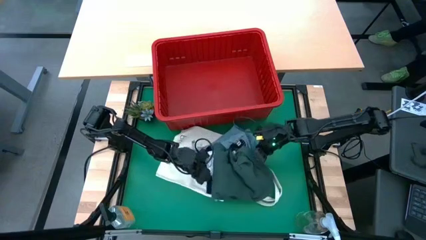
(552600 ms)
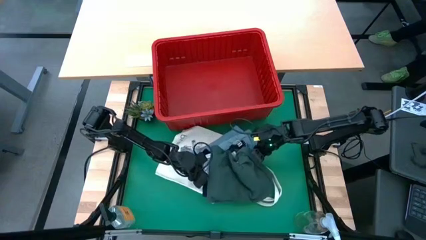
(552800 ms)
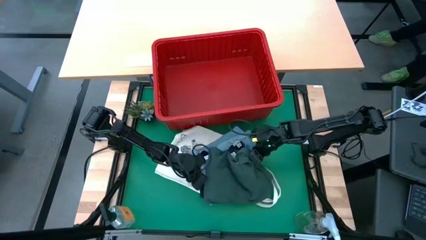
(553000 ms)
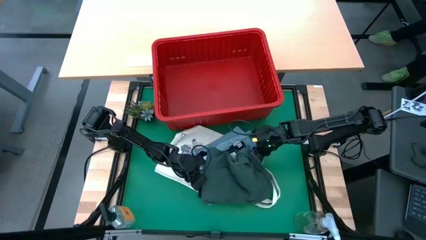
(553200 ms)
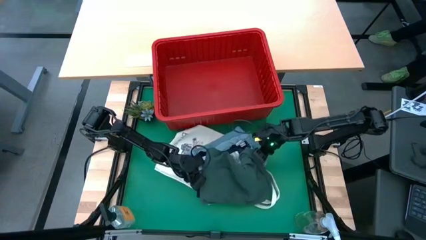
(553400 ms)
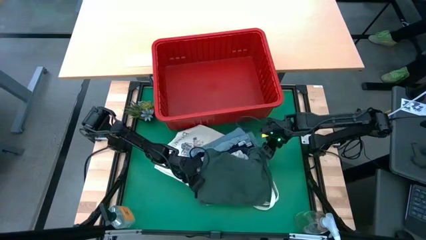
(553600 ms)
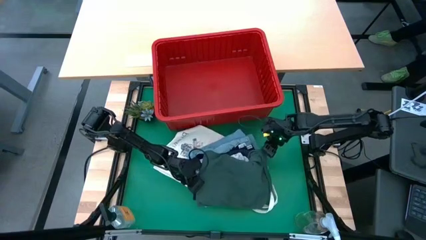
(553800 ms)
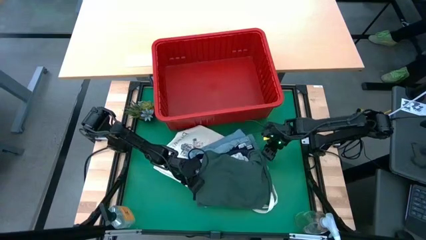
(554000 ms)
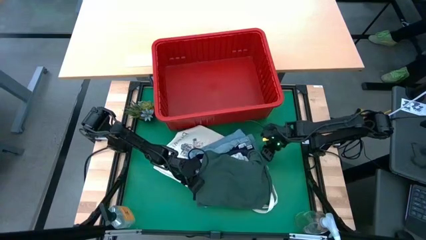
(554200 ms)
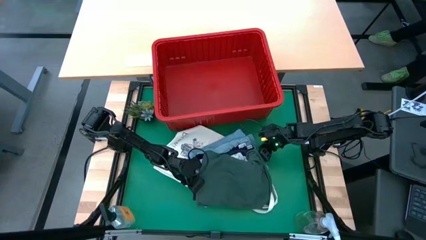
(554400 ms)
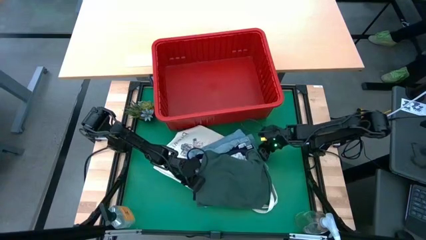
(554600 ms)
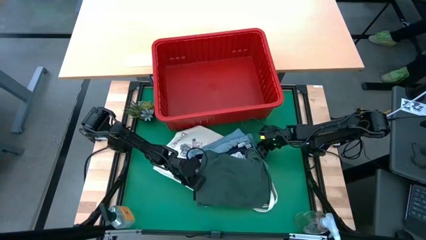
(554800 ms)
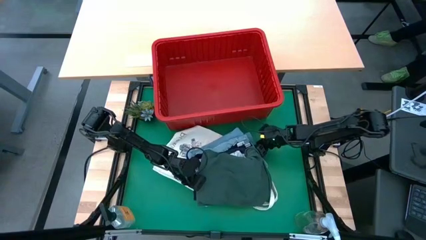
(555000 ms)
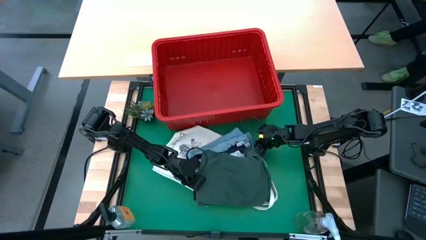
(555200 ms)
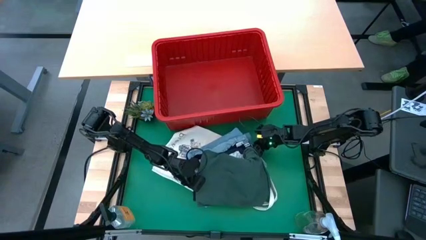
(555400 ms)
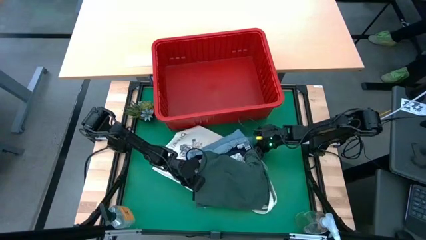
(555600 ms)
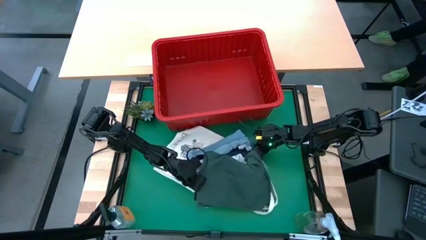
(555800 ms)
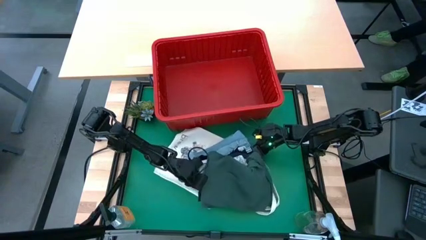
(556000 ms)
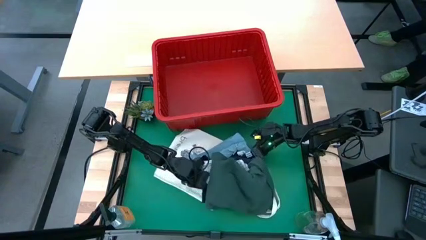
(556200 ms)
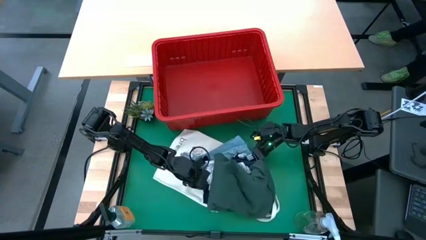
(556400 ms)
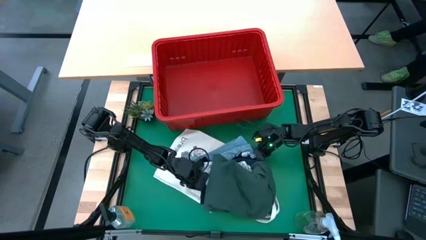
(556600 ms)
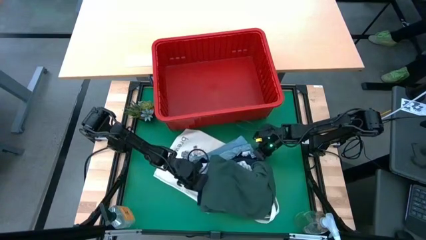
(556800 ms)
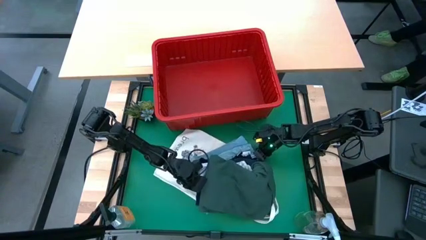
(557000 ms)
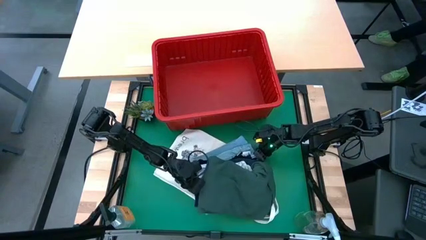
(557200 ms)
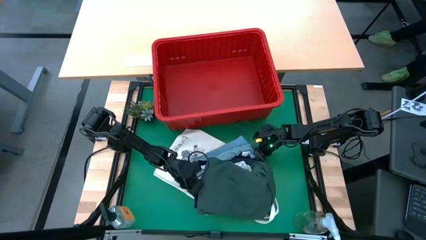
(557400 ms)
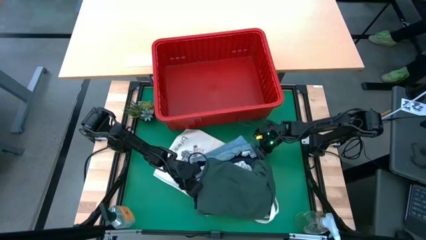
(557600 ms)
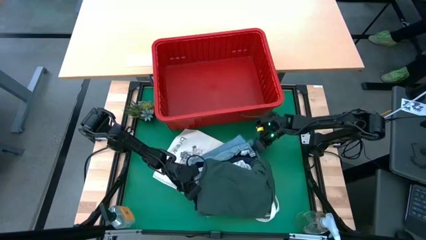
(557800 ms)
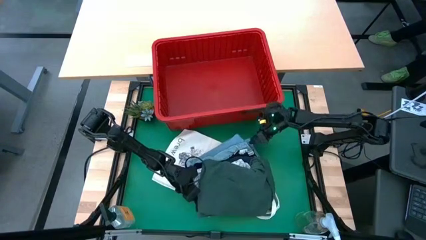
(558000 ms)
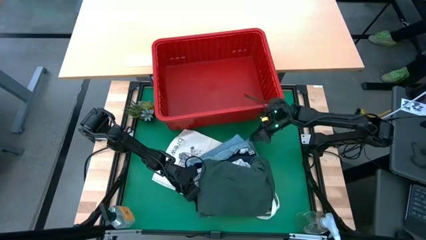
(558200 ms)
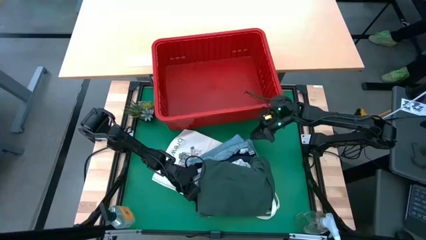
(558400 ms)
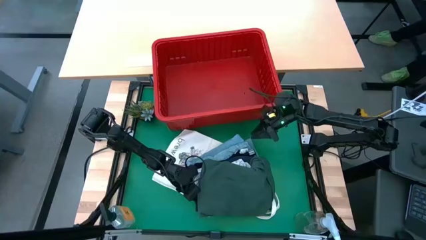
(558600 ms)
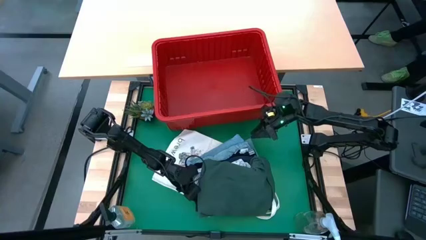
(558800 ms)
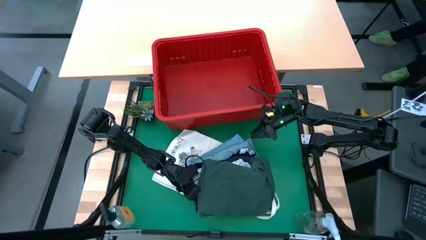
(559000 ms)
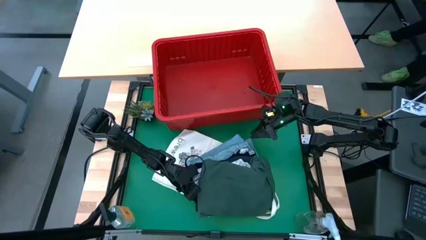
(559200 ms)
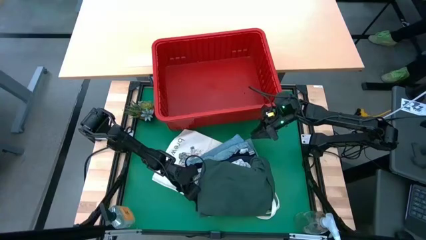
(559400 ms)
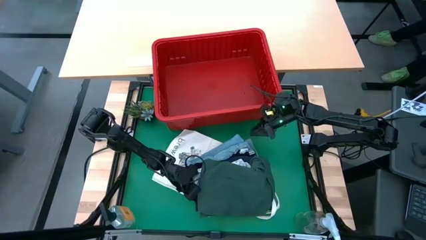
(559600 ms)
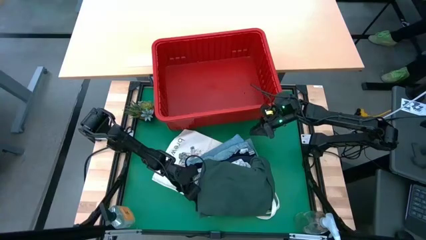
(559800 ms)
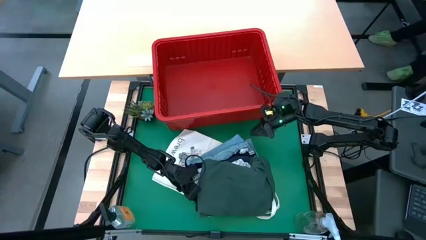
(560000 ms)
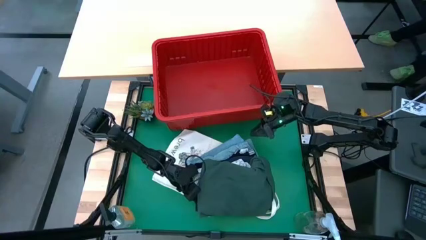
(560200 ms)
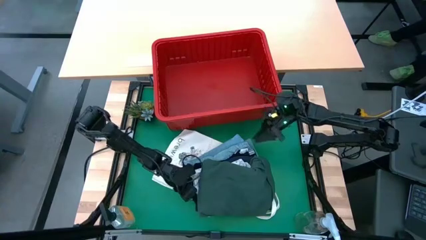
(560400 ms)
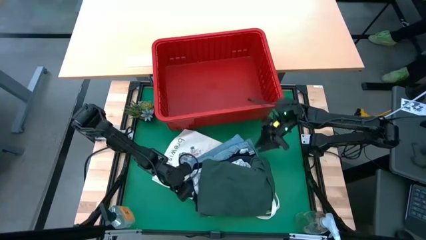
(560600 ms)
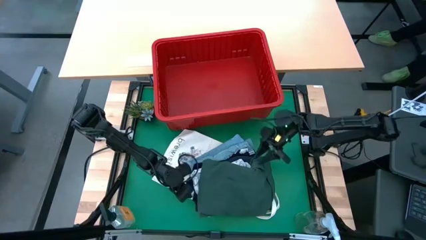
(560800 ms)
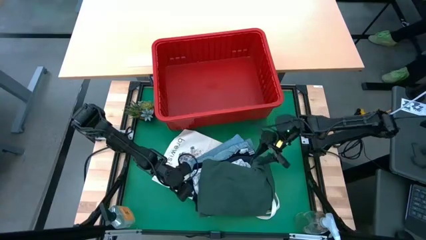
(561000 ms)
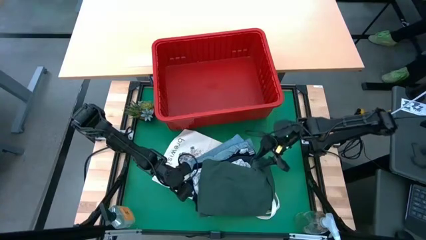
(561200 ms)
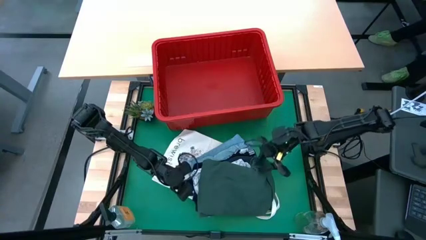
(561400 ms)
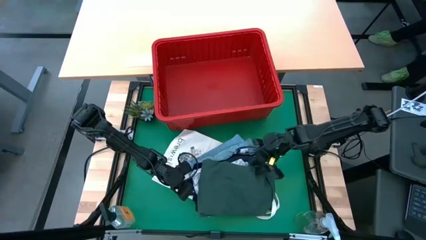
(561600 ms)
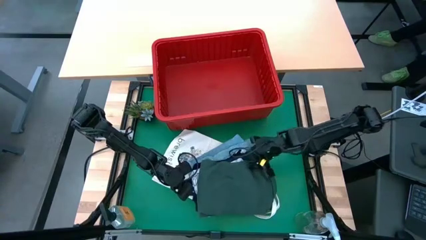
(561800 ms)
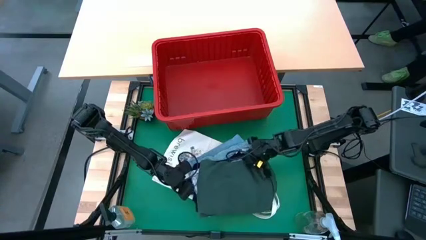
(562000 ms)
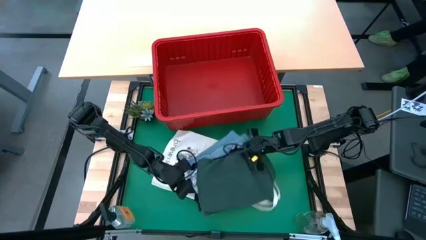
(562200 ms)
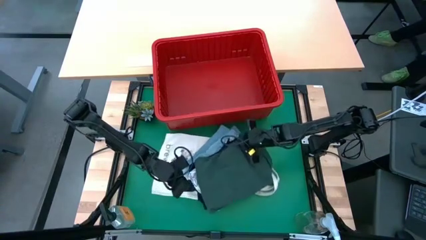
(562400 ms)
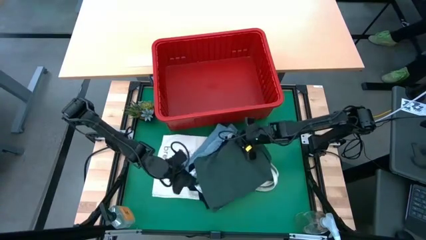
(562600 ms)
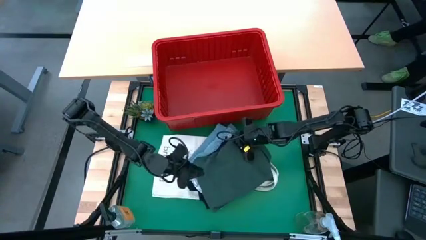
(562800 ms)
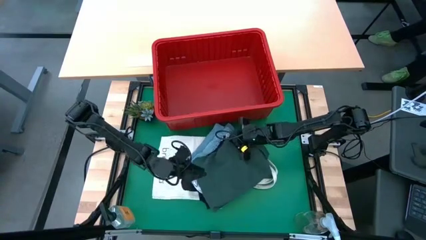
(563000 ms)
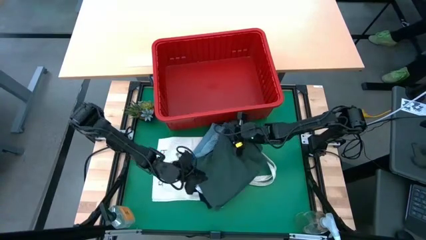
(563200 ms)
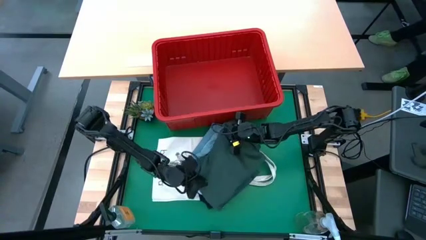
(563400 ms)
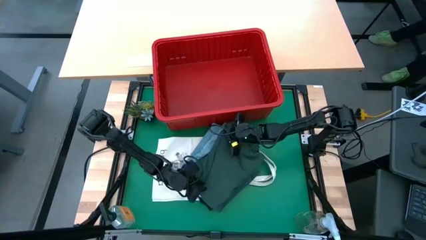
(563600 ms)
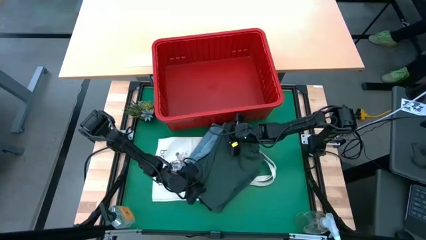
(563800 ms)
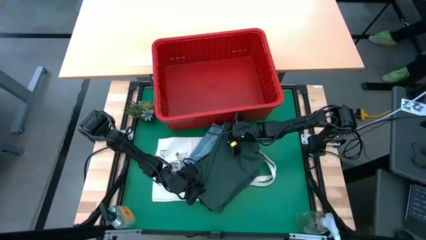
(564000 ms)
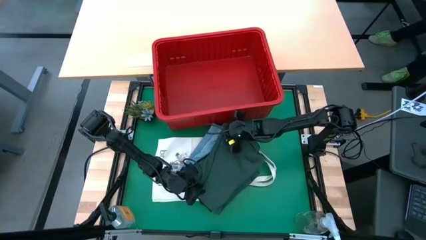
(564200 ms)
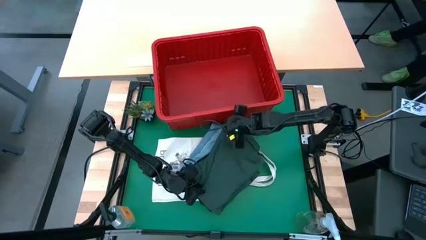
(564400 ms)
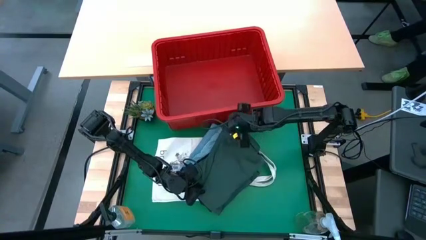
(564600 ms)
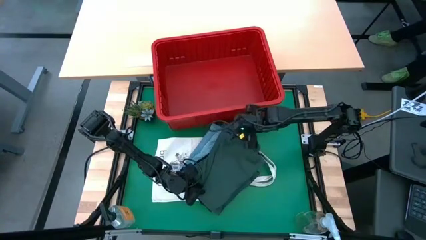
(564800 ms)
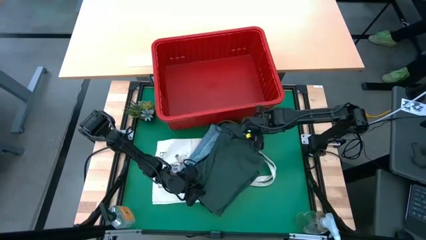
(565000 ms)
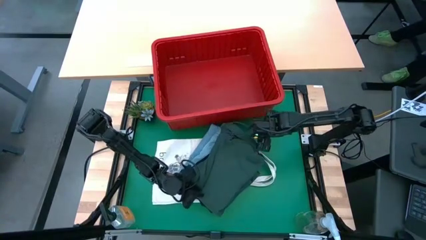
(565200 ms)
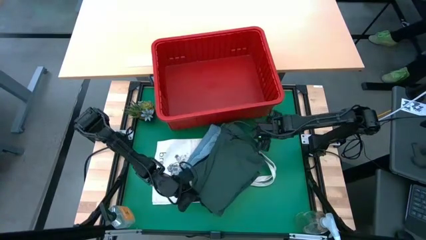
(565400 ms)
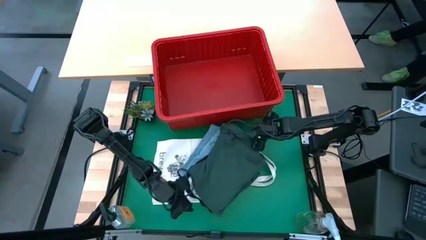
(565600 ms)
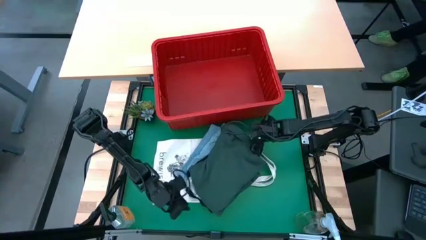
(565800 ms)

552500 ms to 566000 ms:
Task: Fold laundry
Put the clothes into the red bin

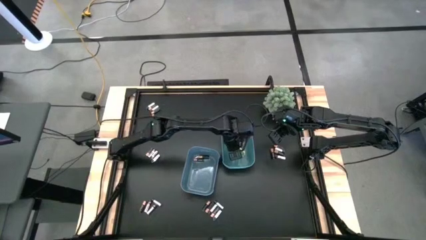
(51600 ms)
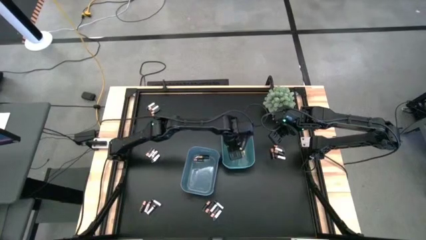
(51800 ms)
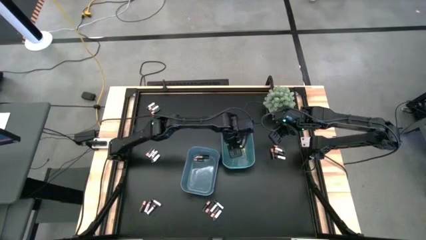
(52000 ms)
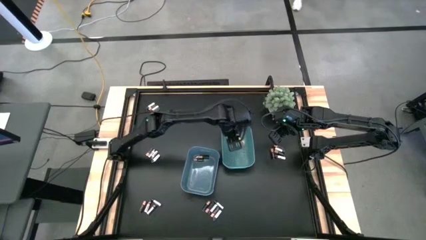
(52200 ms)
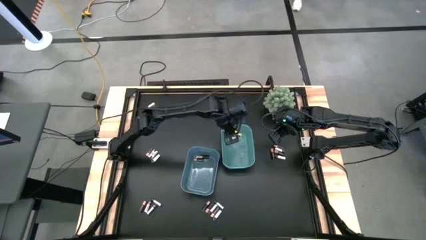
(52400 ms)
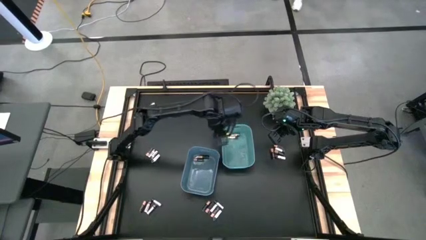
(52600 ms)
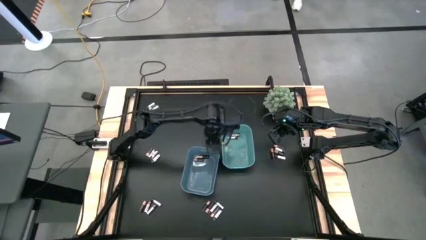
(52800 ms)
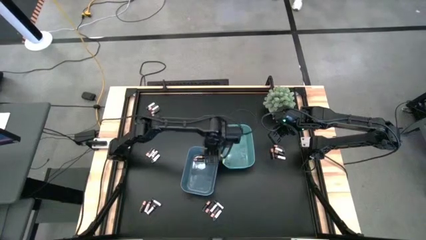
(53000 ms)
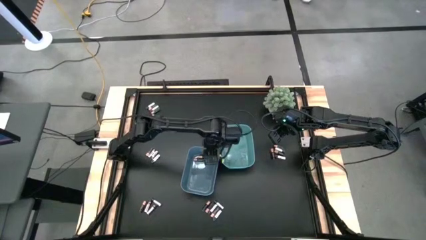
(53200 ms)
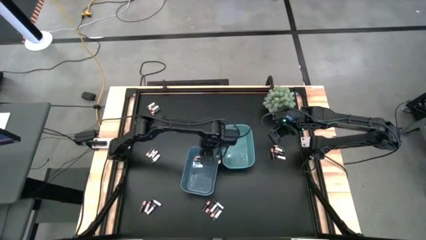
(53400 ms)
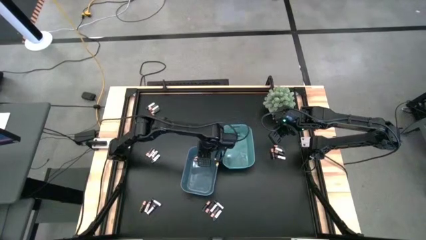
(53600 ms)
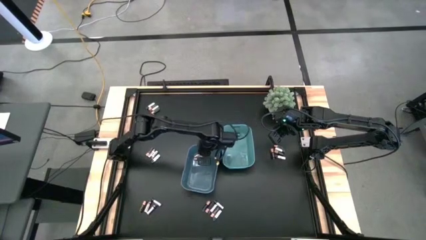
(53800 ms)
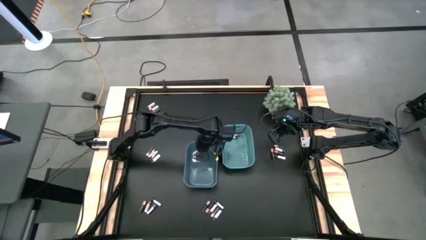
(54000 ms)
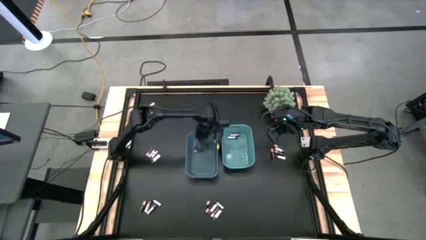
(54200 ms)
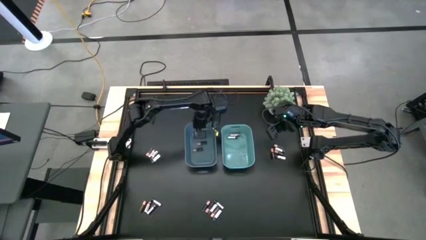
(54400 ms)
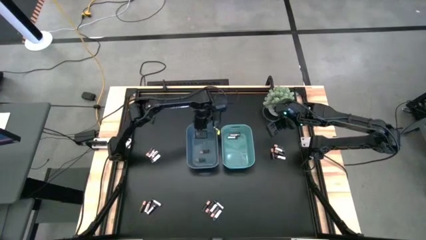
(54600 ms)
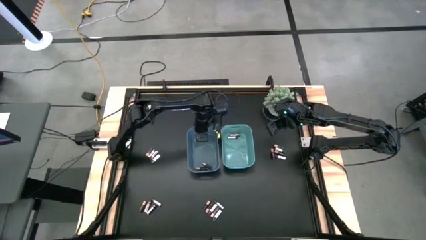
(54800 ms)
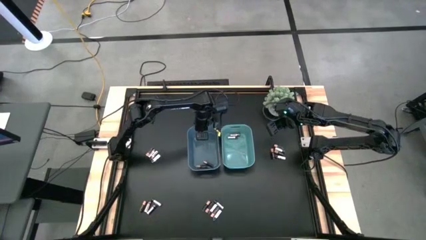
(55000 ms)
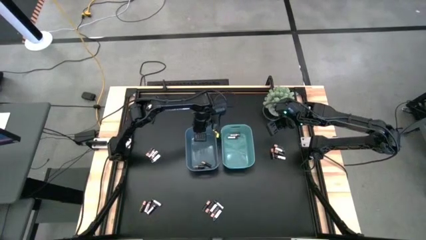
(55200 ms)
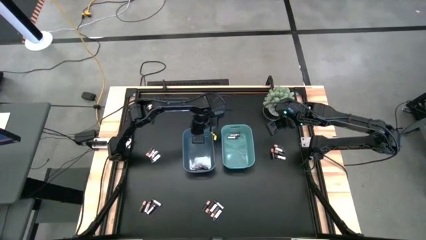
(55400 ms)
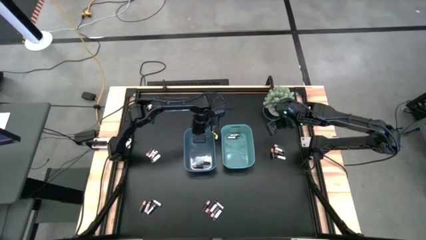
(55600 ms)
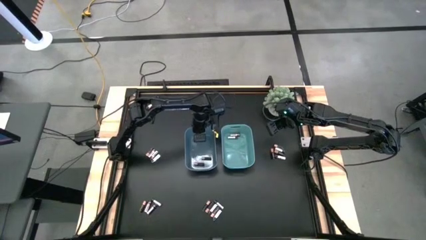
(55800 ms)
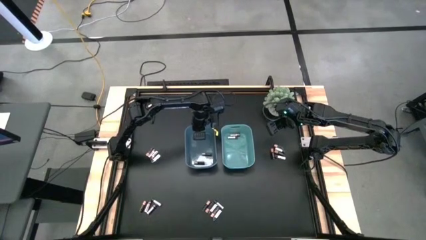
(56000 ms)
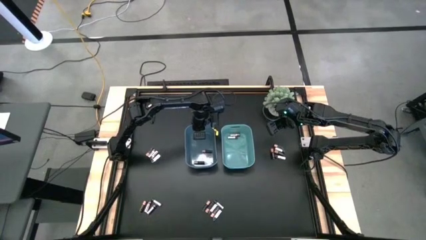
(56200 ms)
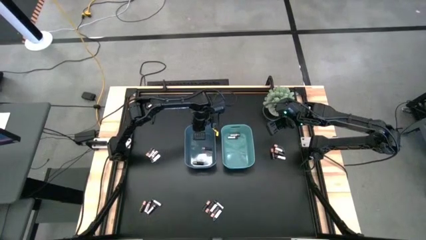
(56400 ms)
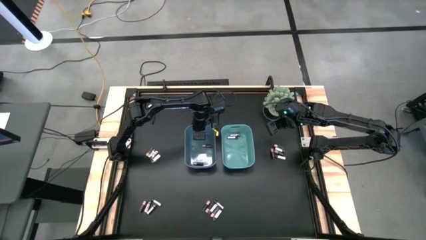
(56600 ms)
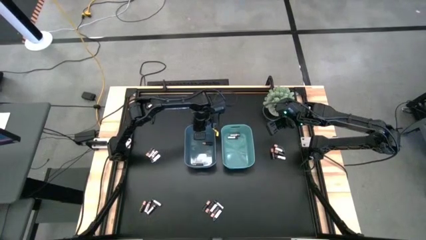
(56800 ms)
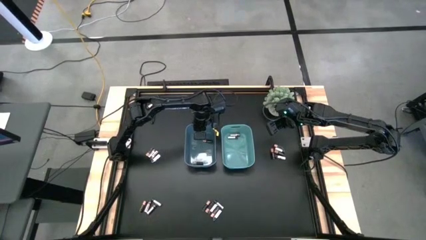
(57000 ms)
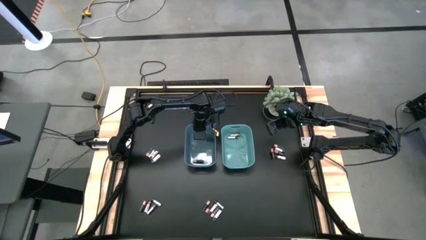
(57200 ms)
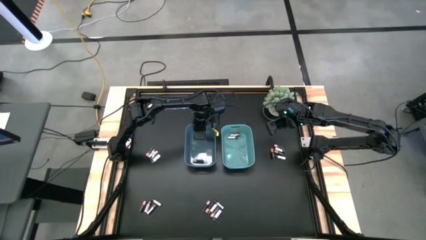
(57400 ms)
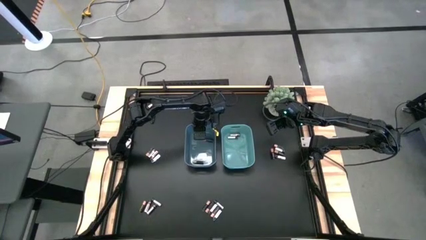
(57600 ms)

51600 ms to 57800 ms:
Task: Sort batteries
Adjust the blue bin
